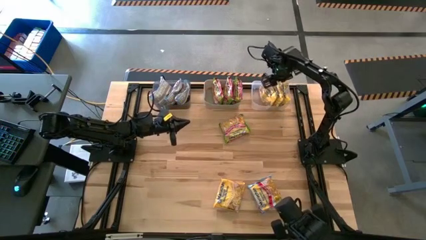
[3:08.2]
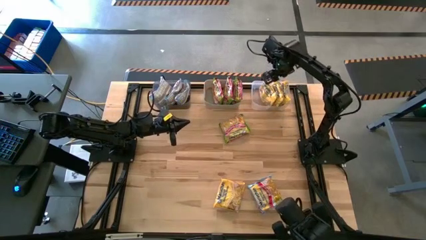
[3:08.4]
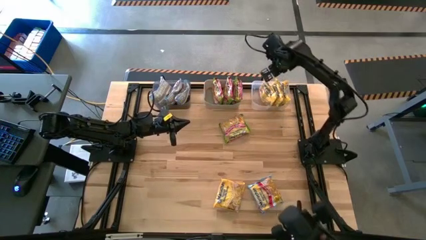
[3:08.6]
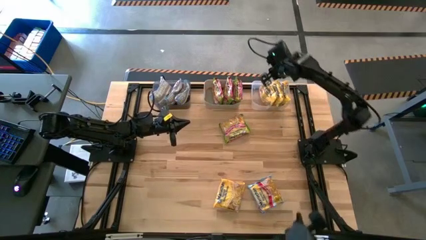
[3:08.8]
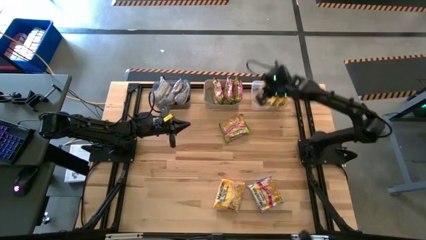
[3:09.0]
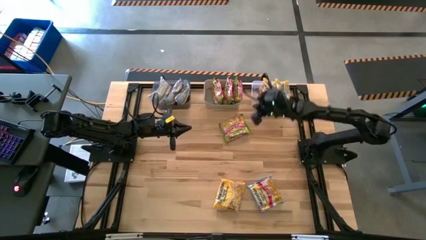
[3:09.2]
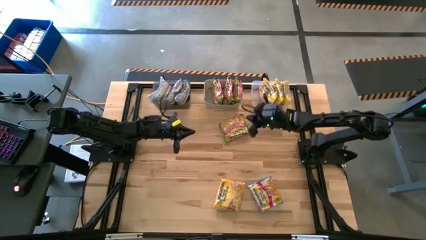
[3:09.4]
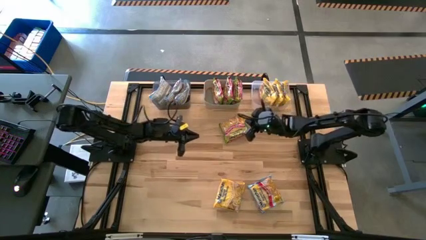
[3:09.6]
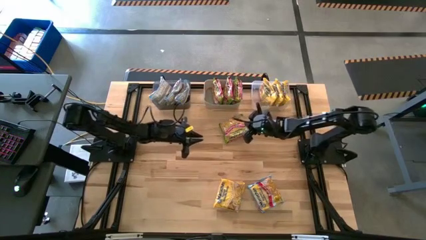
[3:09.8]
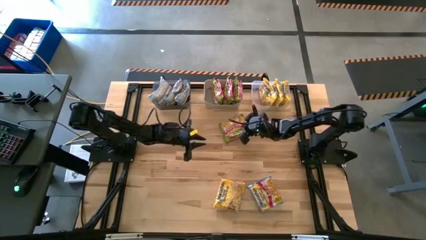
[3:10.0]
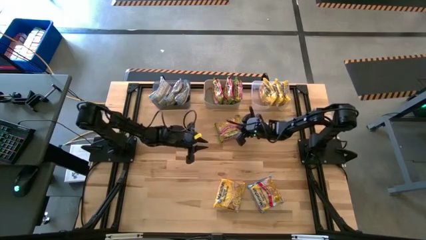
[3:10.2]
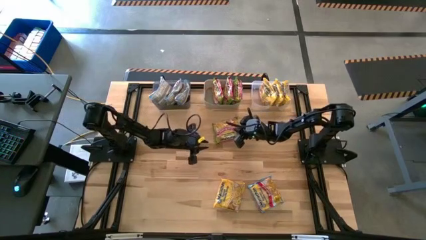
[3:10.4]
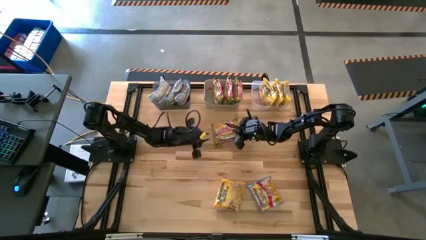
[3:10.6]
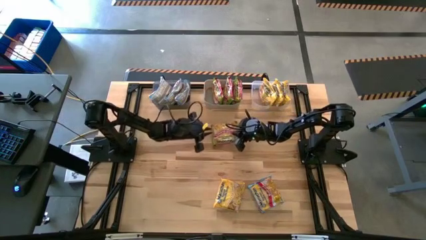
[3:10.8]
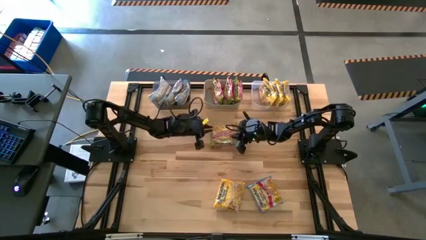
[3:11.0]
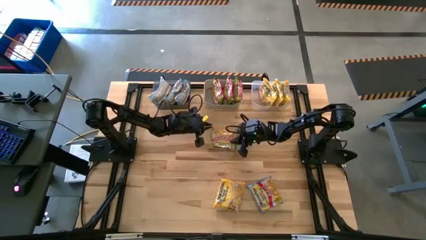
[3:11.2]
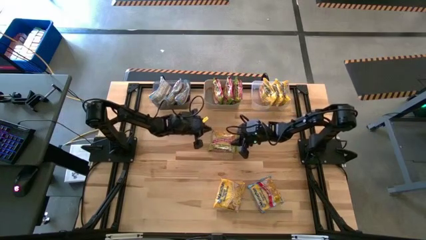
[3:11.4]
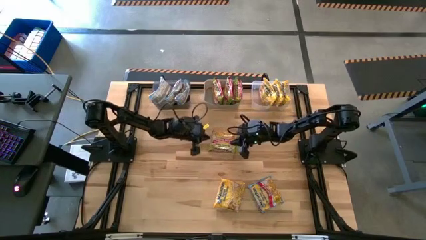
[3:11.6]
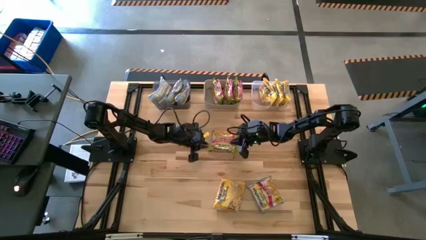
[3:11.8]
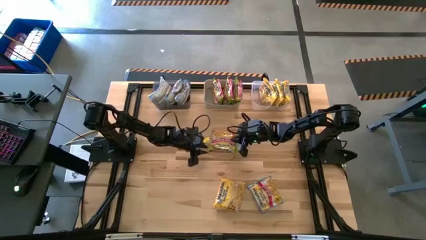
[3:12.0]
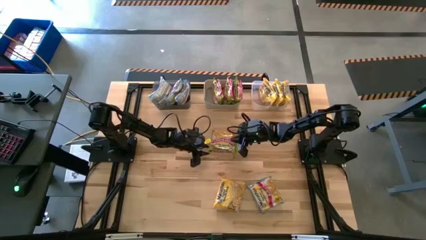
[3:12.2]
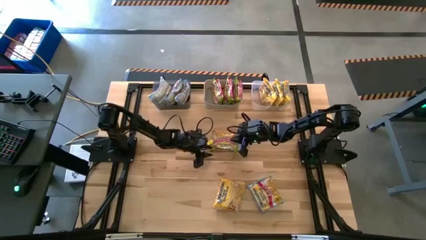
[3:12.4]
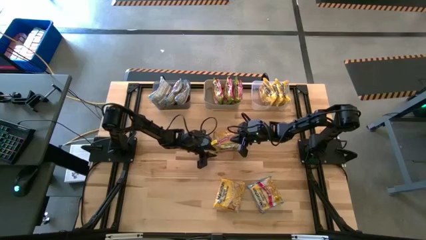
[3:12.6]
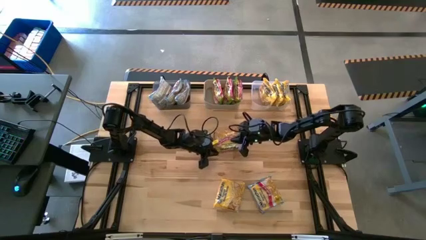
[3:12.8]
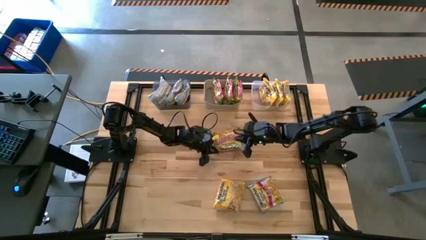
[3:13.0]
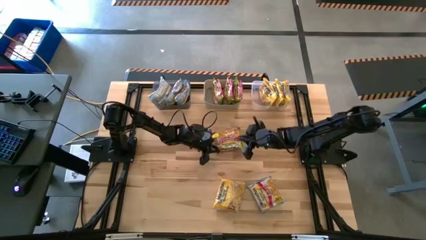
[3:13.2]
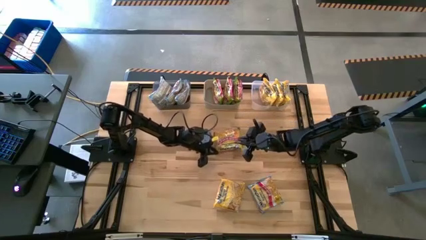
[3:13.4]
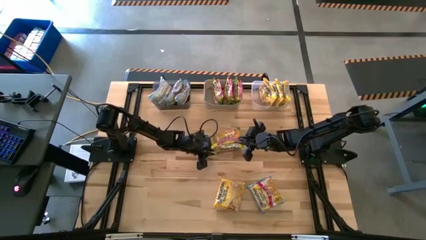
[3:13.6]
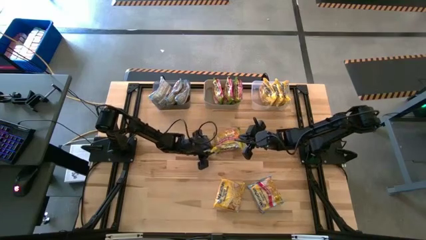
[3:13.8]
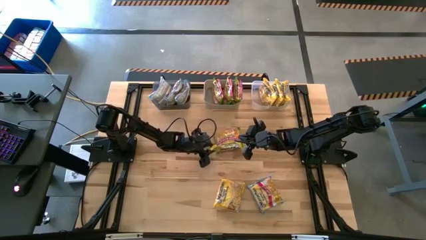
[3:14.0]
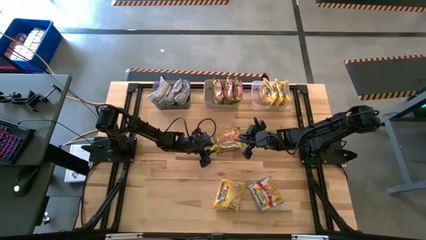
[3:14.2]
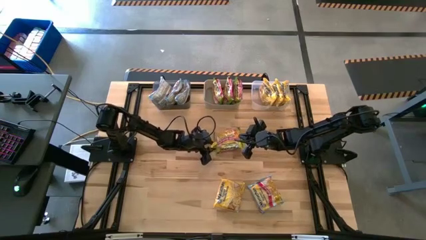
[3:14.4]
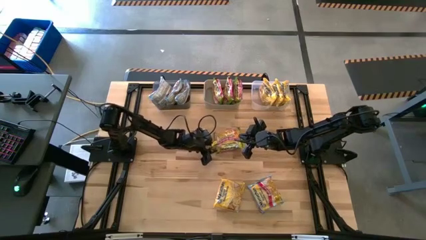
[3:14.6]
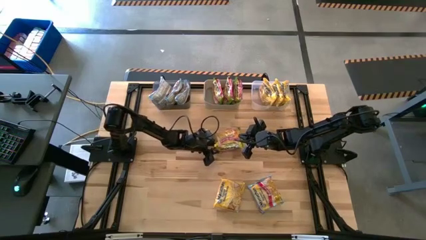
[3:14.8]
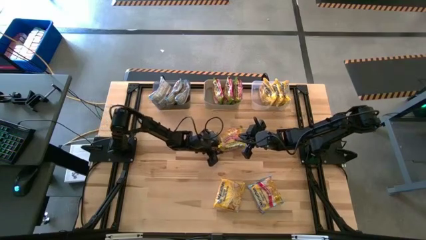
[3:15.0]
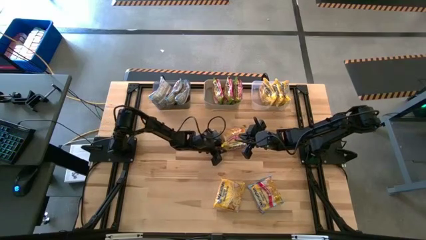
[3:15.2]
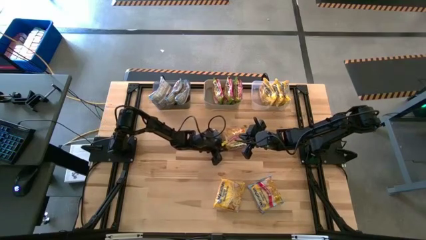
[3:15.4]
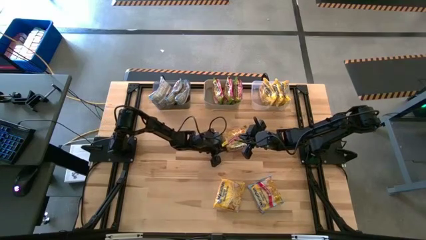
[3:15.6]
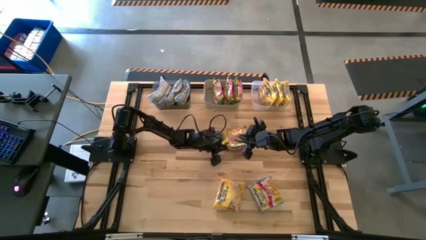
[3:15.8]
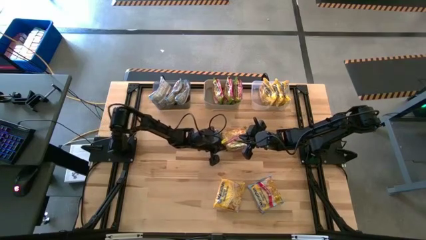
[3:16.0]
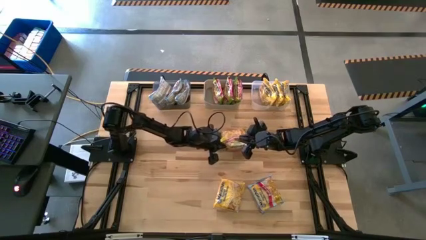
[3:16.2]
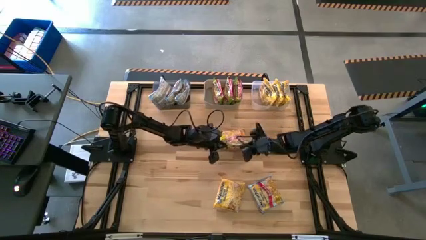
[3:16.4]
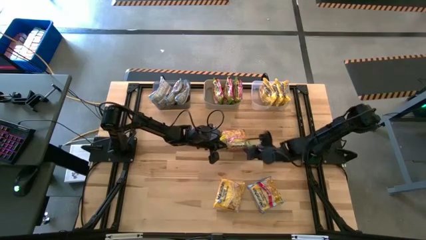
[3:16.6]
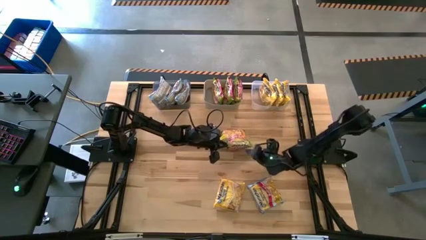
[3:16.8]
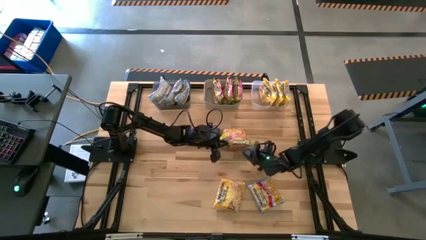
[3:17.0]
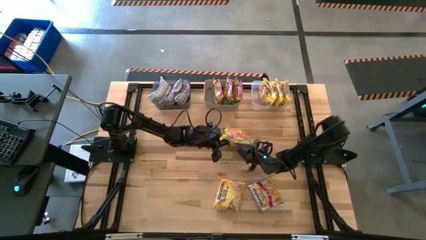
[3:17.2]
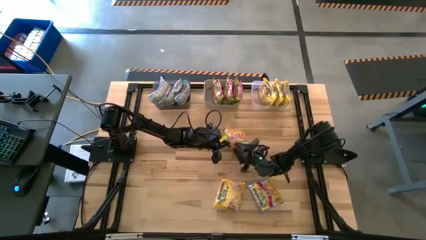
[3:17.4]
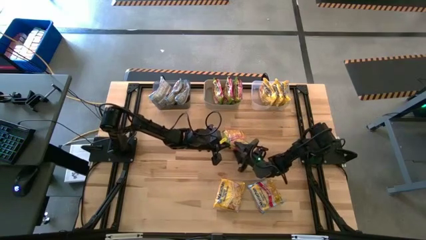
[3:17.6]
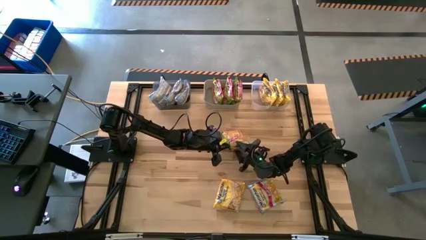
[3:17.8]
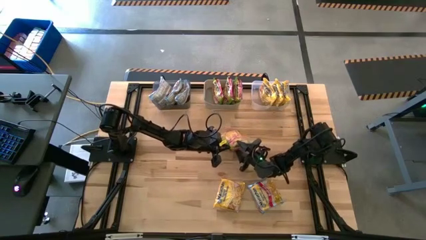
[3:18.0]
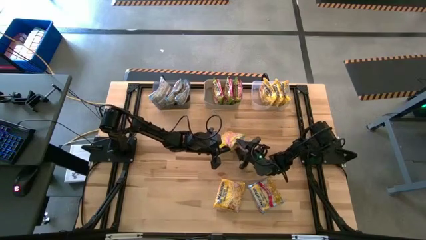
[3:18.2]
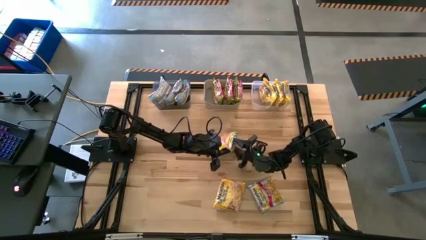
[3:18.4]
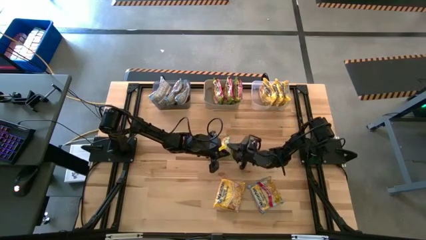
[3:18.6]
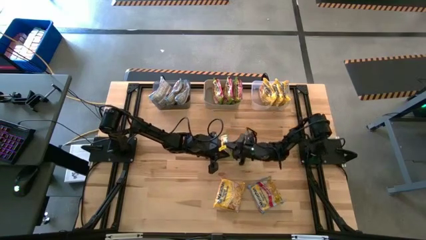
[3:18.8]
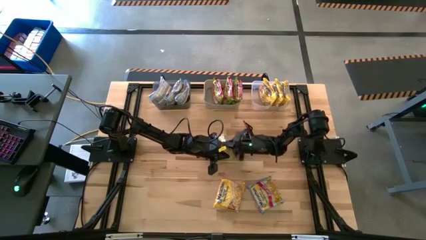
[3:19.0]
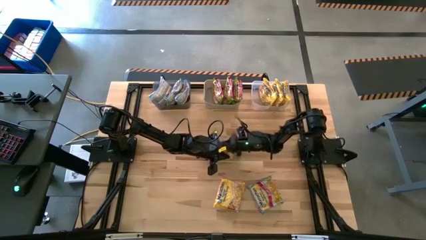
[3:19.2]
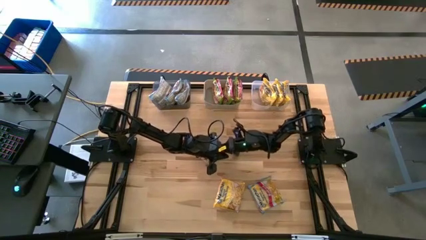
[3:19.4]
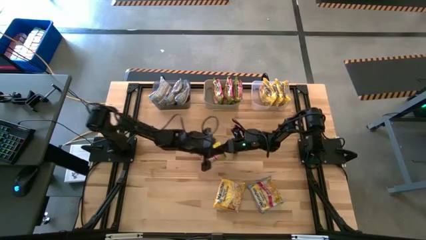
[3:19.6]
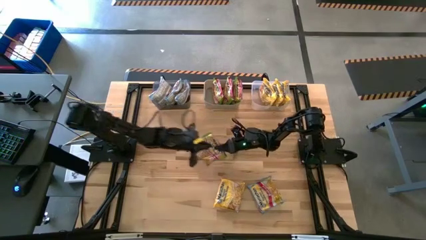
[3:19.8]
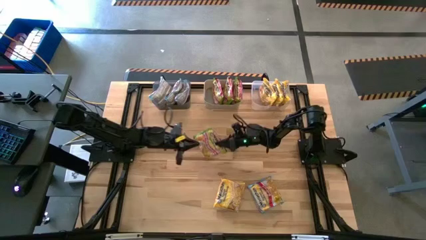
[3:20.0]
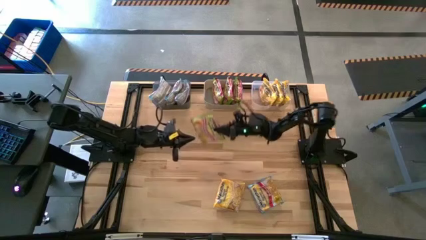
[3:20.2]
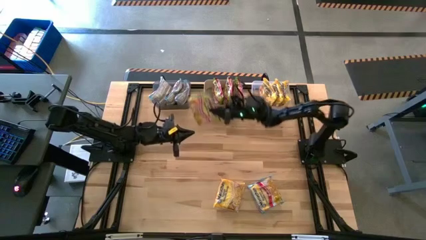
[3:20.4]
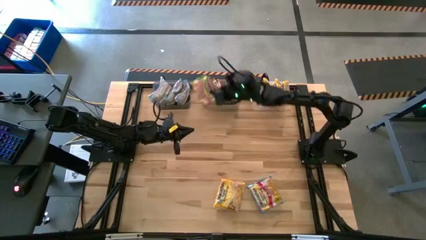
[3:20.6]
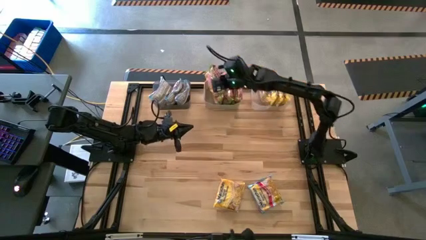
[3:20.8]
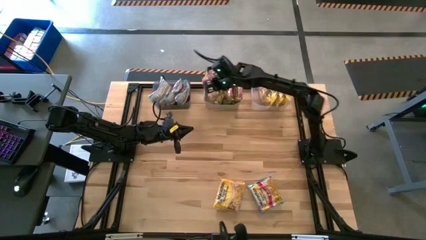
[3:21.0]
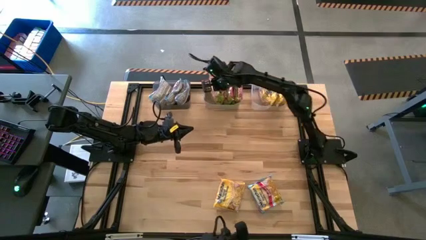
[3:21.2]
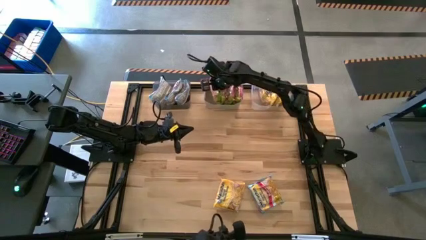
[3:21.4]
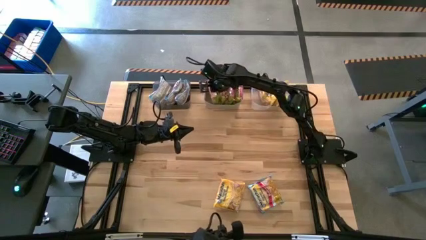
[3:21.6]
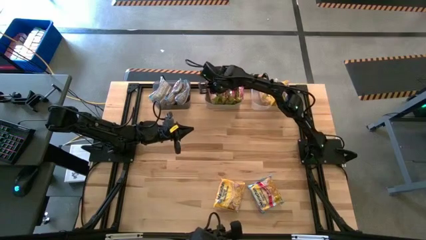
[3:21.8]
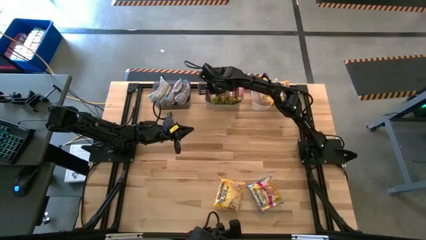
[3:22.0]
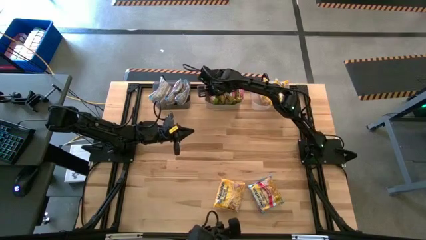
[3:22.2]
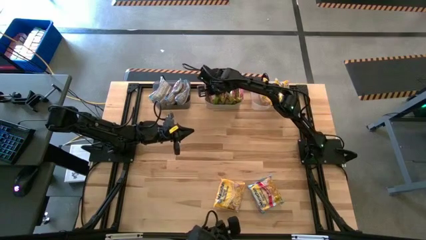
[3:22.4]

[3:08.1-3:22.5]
Task: Sort Maruchan noodles
Put the green noodle pack into the gray bin

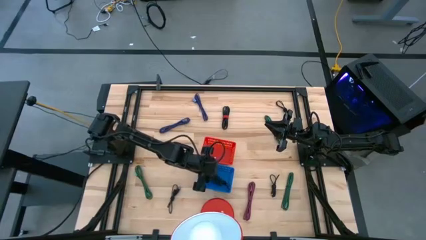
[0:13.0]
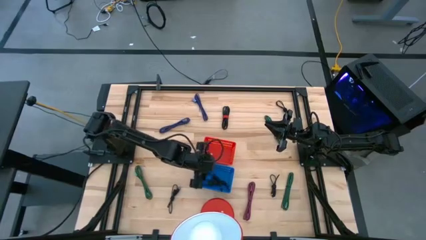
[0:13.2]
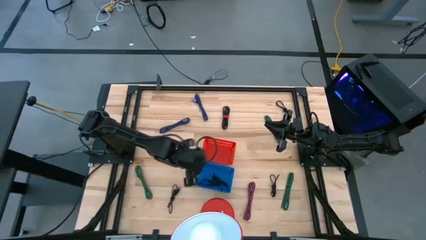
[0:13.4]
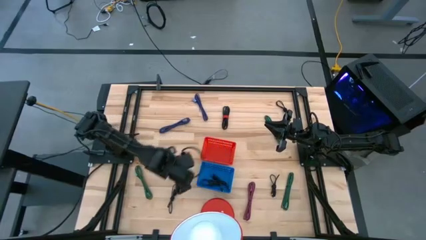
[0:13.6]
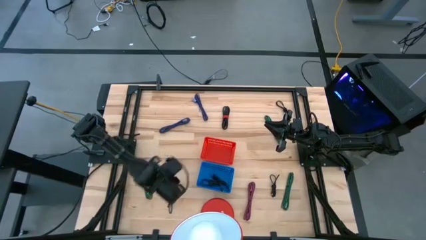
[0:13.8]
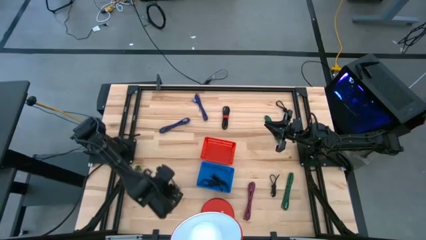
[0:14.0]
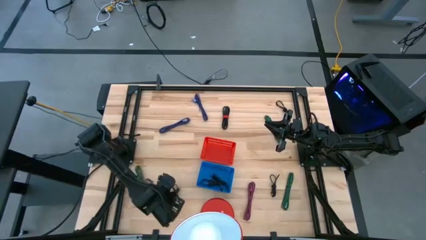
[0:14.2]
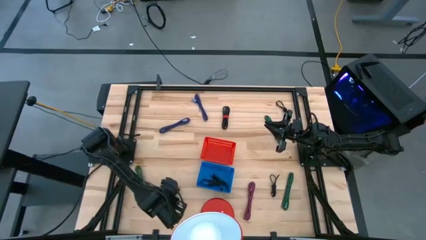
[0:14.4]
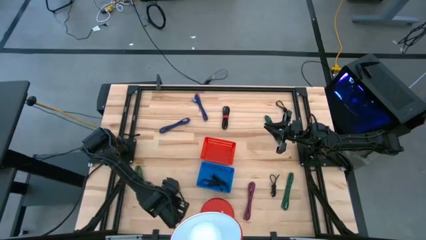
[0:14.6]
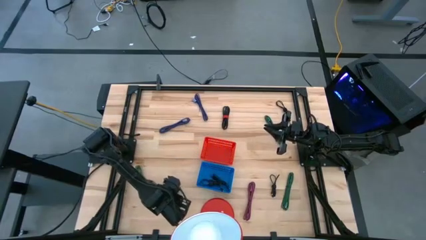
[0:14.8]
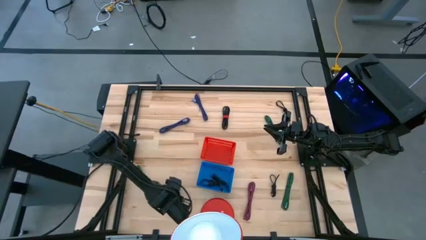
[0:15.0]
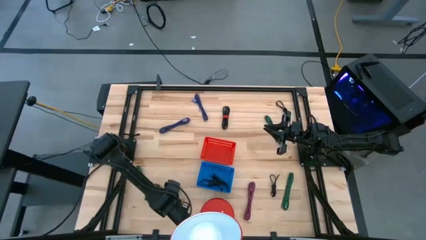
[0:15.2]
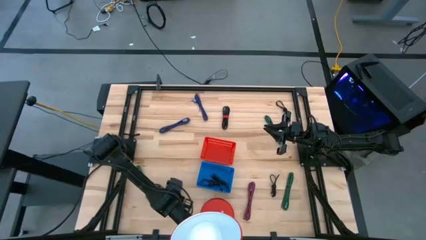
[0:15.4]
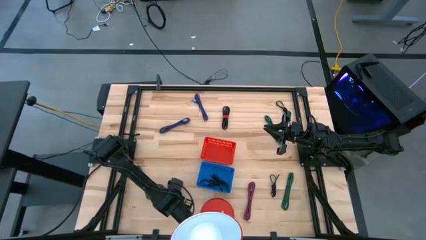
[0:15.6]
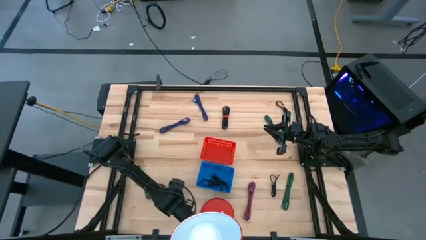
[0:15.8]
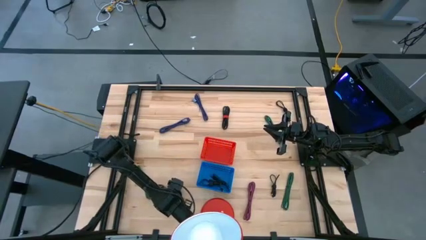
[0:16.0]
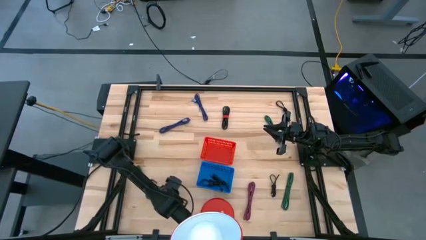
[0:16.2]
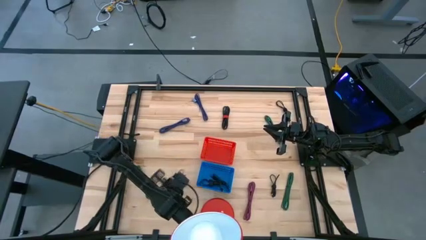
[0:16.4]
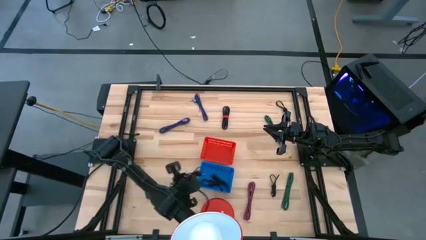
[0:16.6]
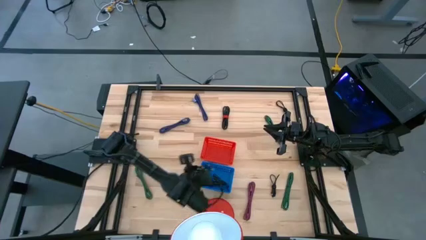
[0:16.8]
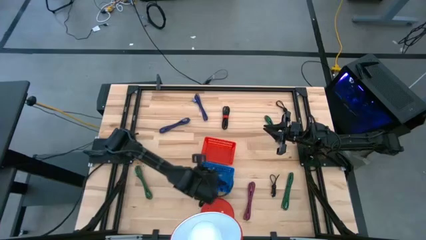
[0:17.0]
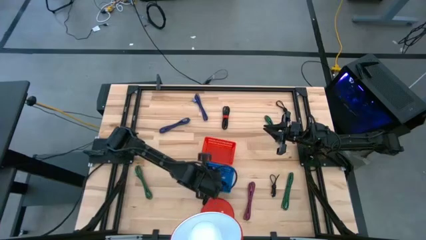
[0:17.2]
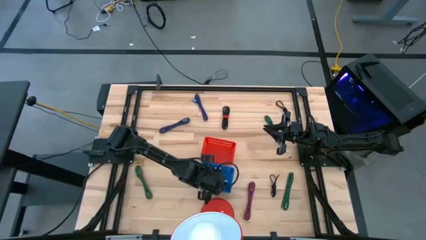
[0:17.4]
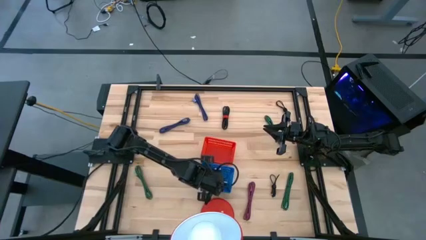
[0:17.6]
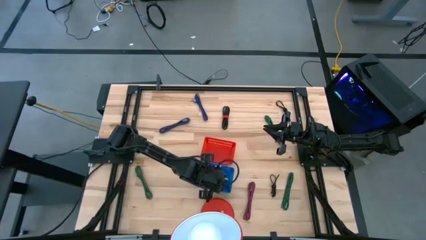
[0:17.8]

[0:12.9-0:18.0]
Task: Pick & Place USB Port
Put the small black USB cable into the blue bin
